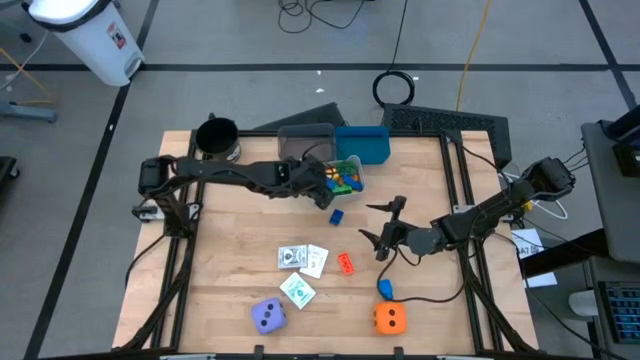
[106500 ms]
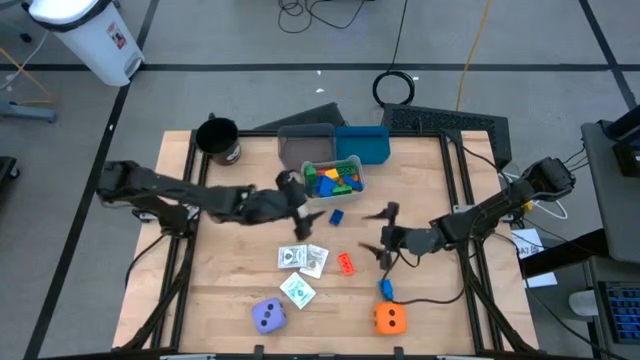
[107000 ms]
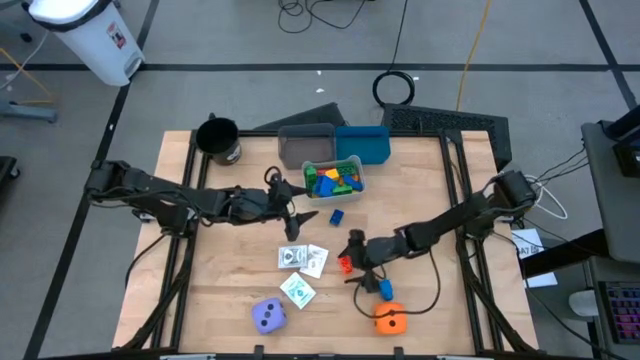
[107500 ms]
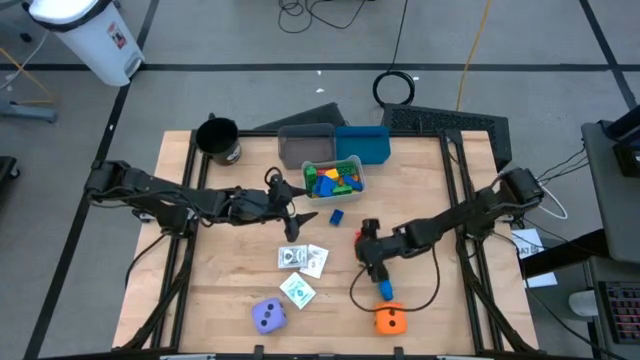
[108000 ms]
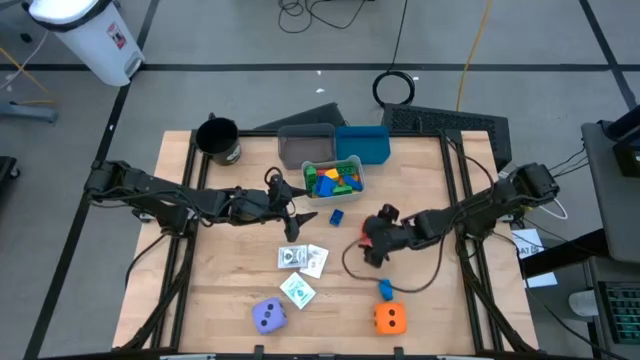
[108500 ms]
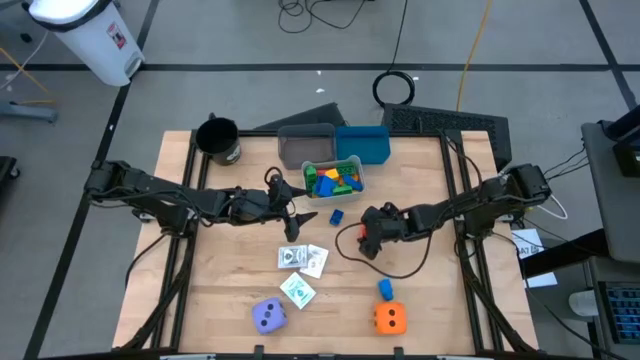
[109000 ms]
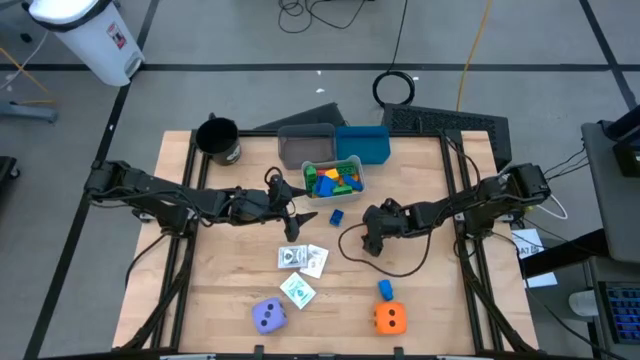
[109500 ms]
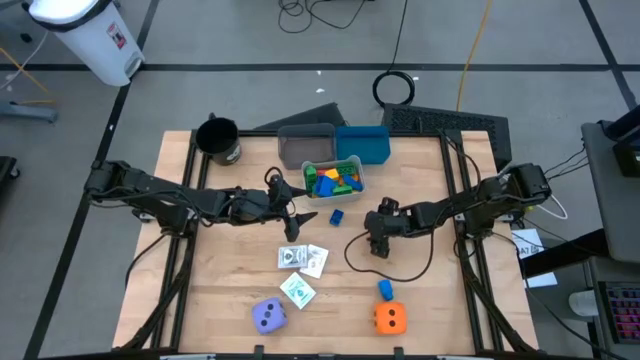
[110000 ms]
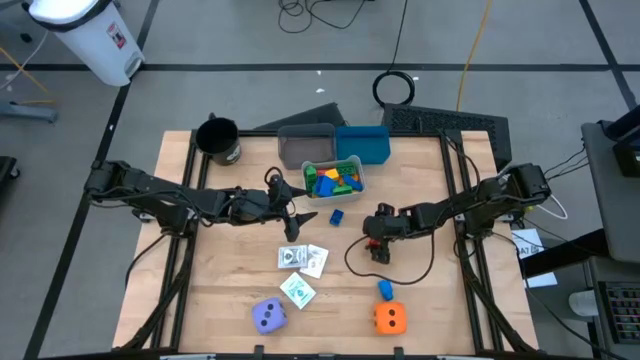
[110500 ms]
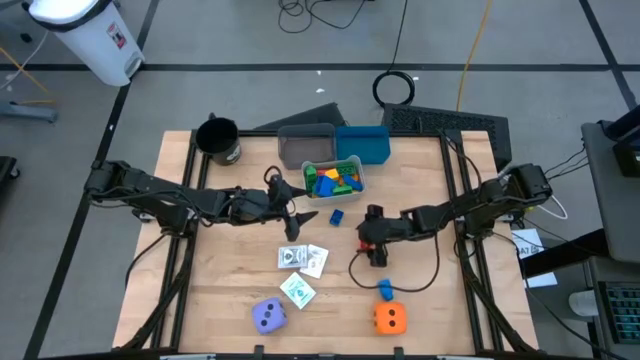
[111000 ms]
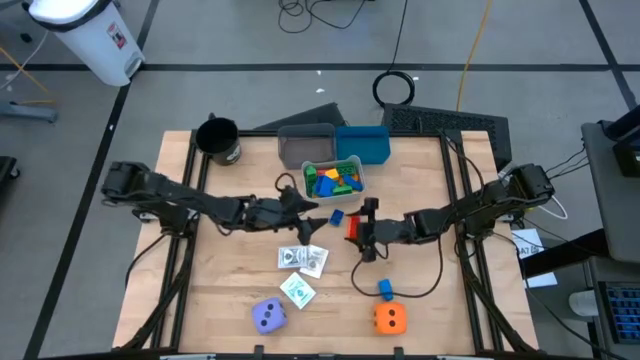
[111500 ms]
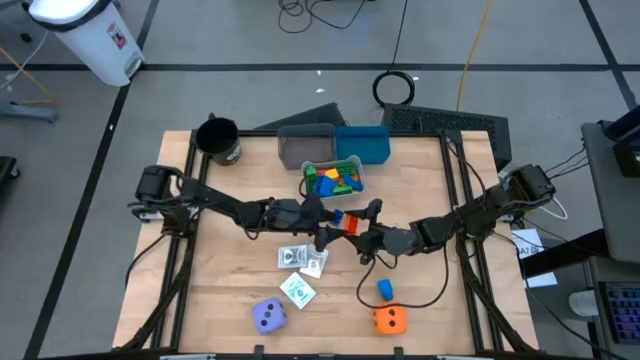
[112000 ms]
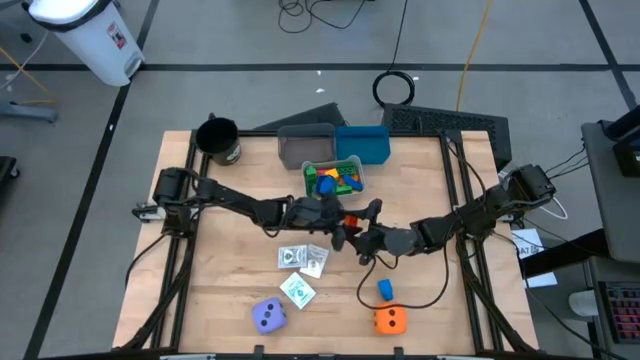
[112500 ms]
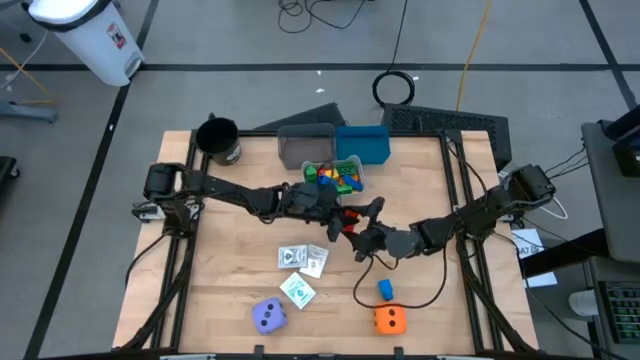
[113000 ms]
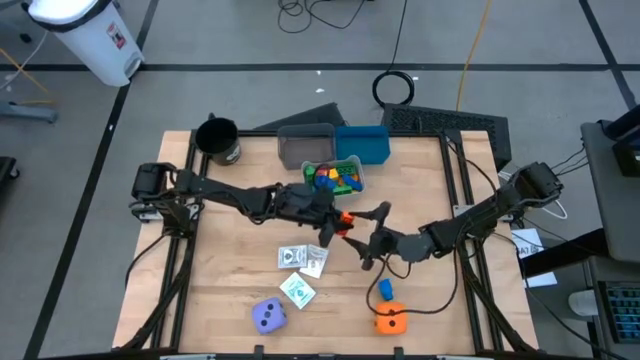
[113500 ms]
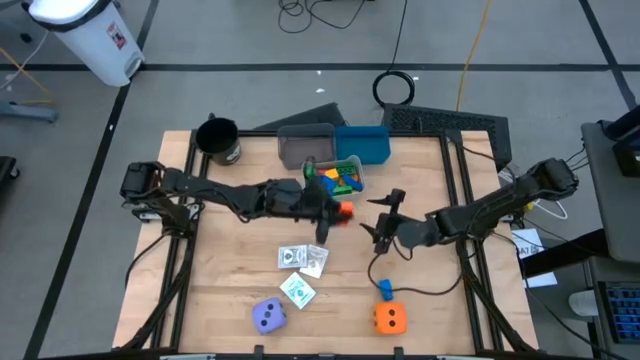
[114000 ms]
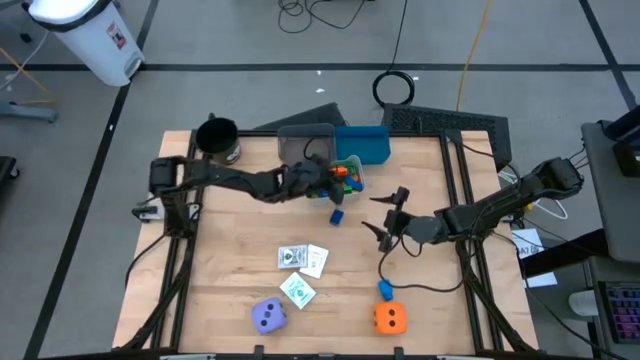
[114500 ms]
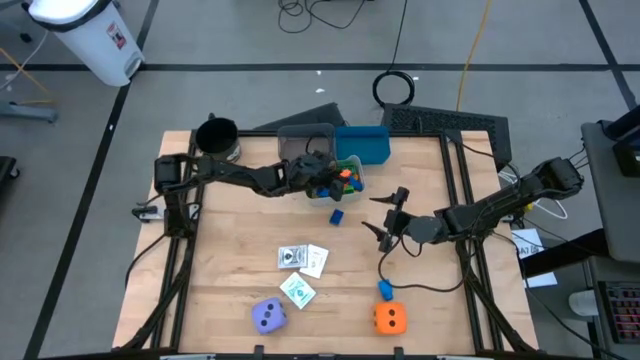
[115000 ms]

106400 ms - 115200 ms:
Task: Pick & Place Toys
Put the orange game piece into the gray bin

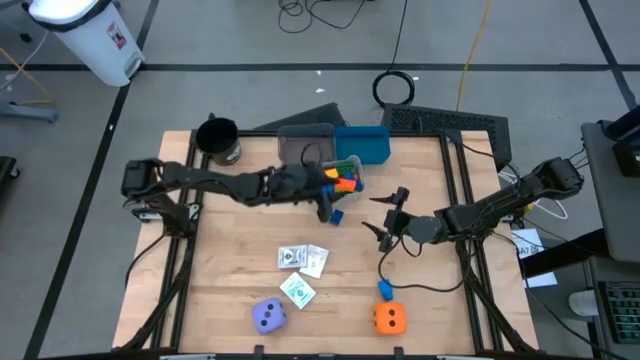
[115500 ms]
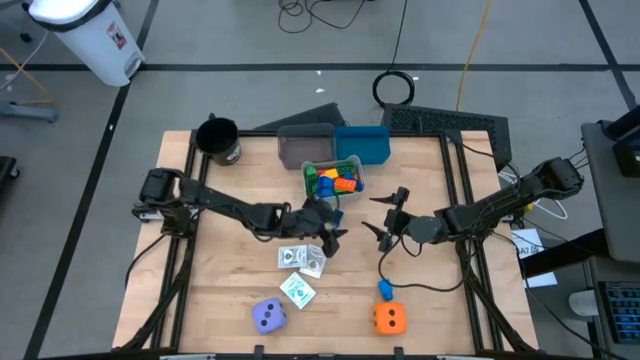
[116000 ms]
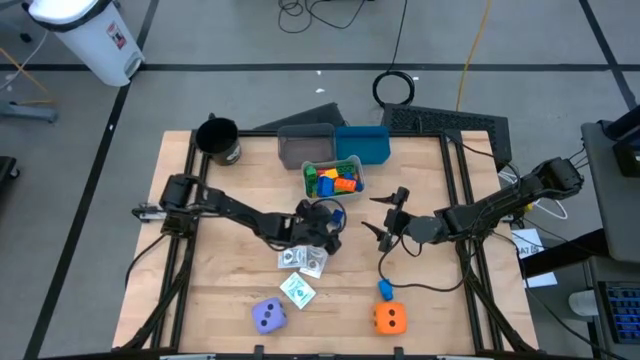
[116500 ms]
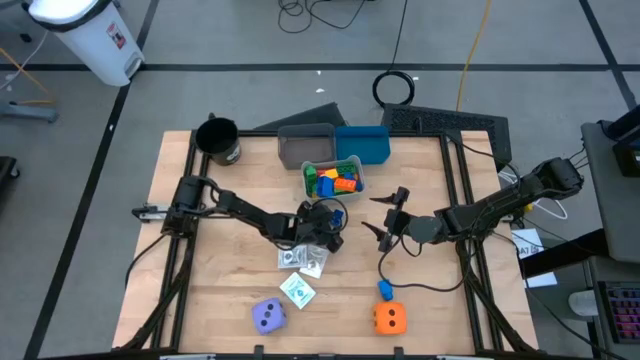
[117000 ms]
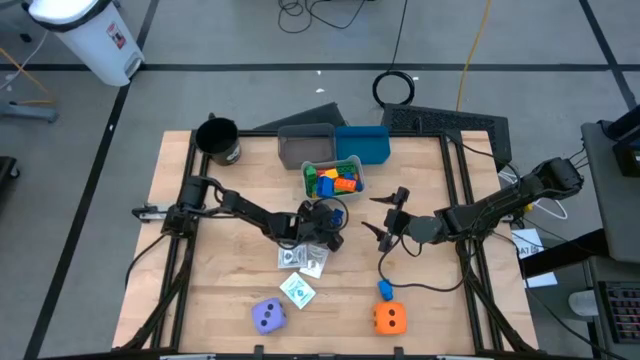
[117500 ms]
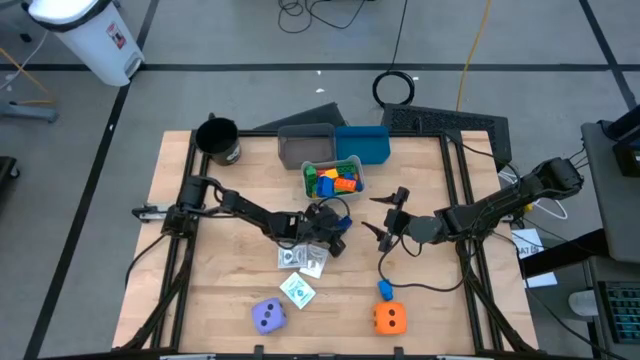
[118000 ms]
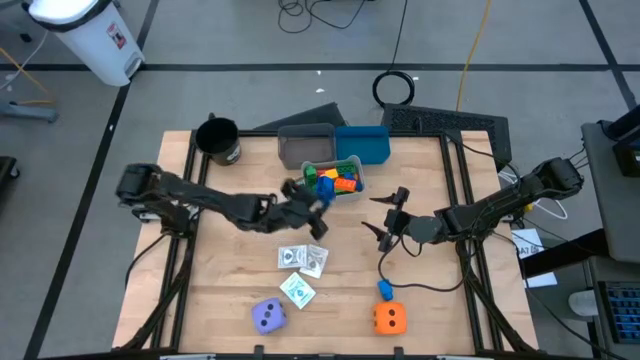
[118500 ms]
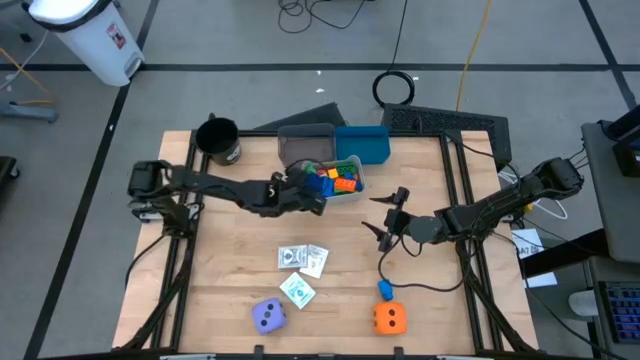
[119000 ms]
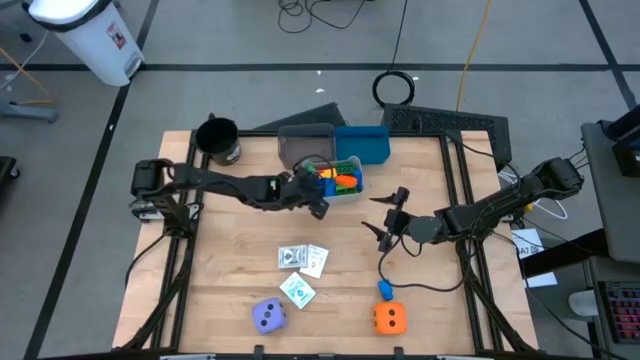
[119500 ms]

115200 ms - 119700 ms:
Put the blue game piece into the gray bin
